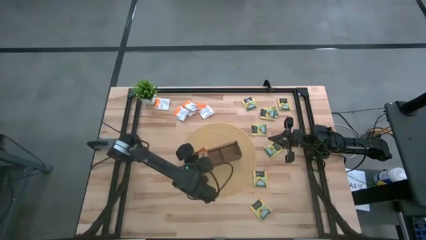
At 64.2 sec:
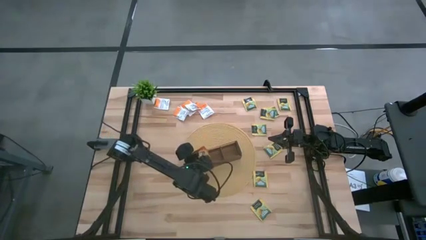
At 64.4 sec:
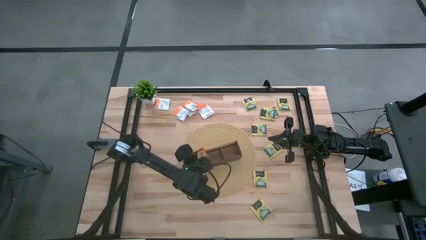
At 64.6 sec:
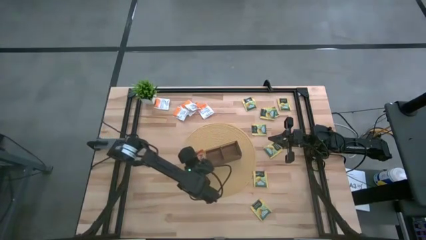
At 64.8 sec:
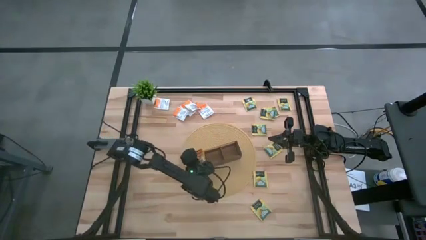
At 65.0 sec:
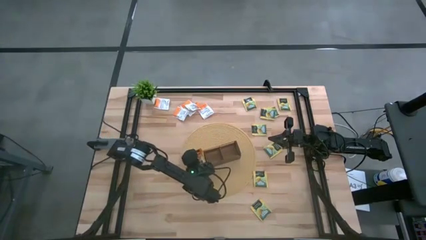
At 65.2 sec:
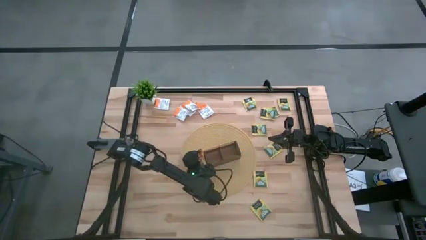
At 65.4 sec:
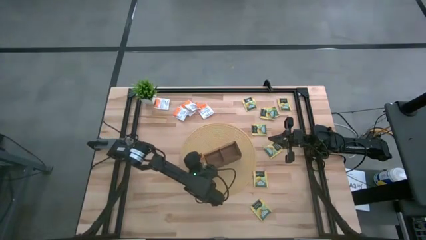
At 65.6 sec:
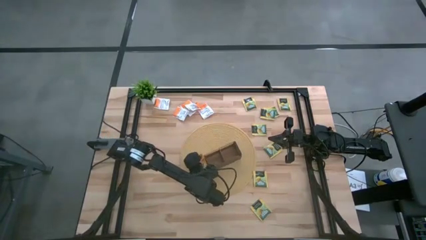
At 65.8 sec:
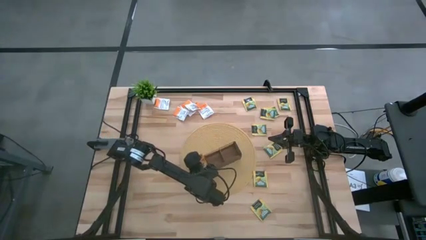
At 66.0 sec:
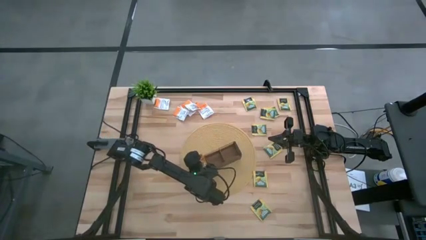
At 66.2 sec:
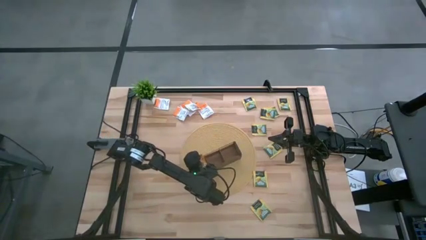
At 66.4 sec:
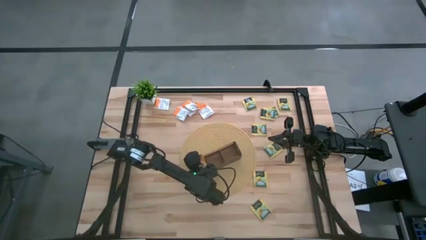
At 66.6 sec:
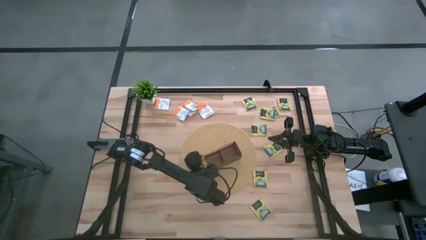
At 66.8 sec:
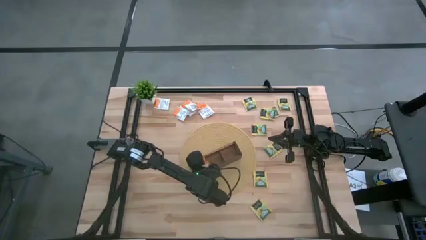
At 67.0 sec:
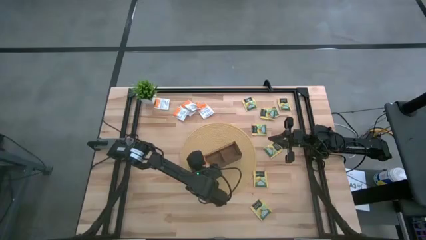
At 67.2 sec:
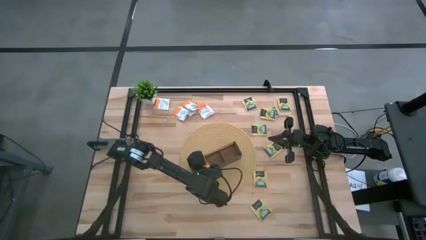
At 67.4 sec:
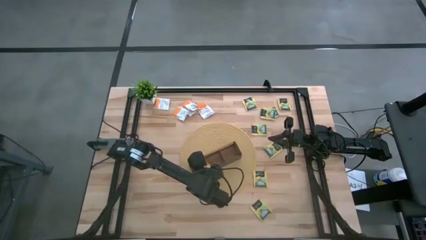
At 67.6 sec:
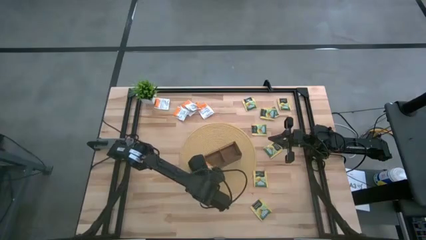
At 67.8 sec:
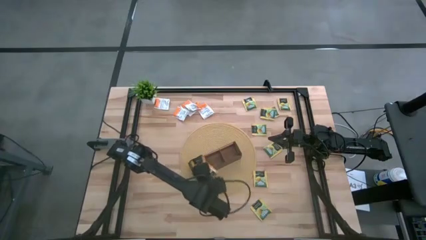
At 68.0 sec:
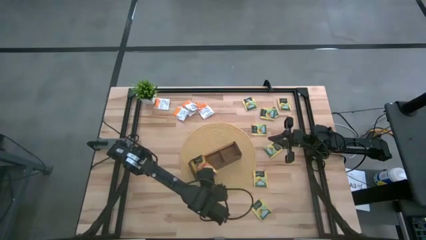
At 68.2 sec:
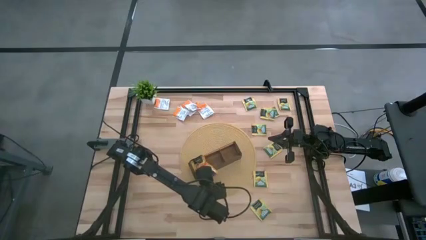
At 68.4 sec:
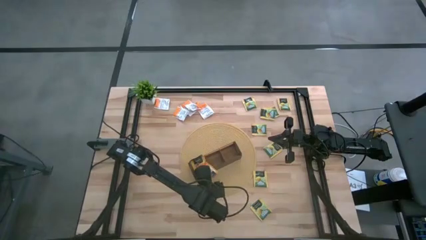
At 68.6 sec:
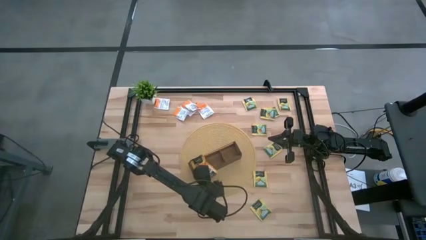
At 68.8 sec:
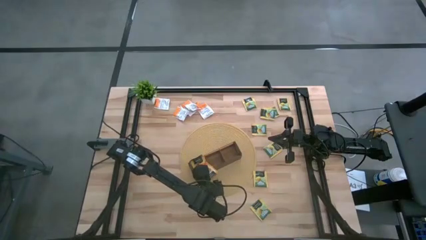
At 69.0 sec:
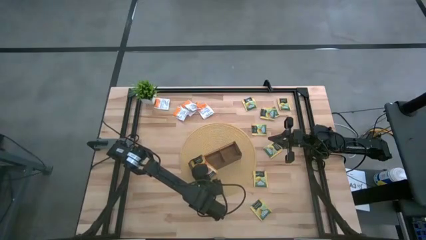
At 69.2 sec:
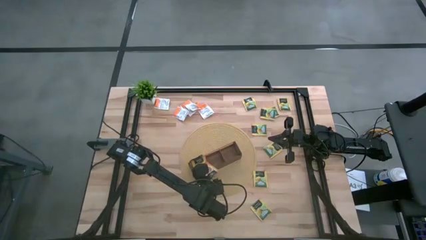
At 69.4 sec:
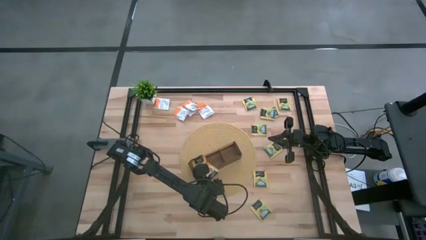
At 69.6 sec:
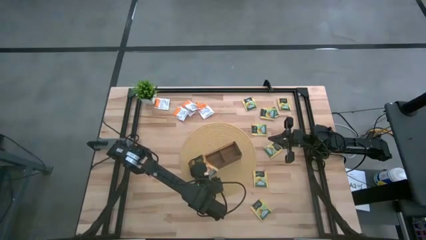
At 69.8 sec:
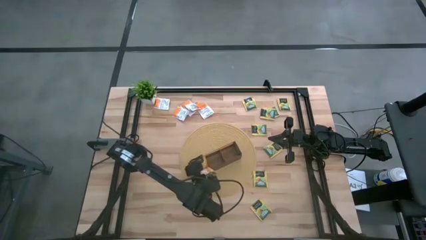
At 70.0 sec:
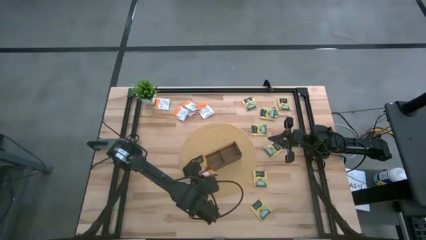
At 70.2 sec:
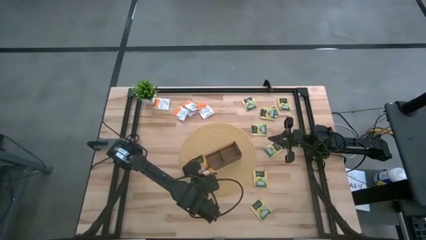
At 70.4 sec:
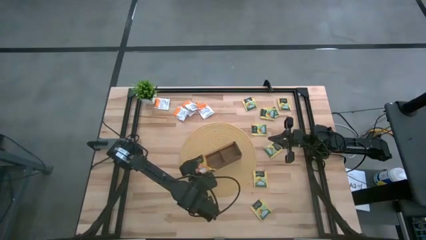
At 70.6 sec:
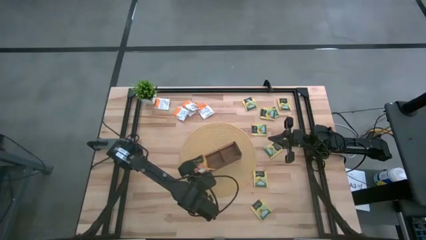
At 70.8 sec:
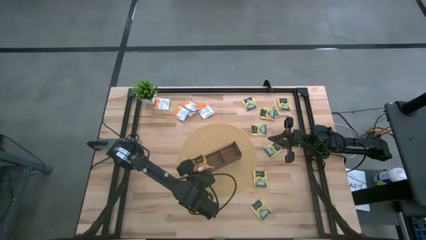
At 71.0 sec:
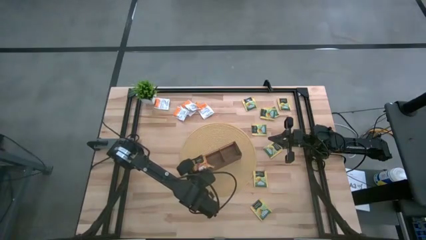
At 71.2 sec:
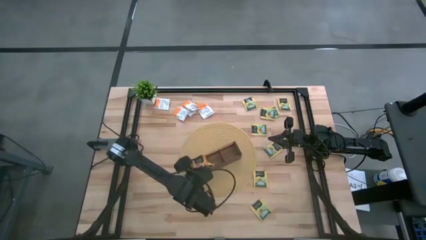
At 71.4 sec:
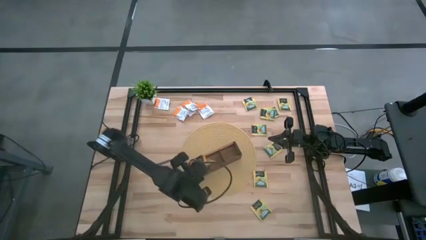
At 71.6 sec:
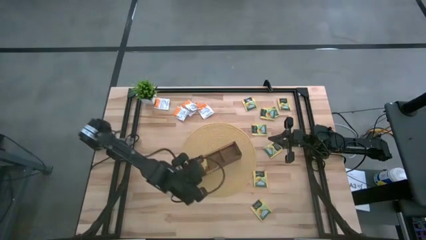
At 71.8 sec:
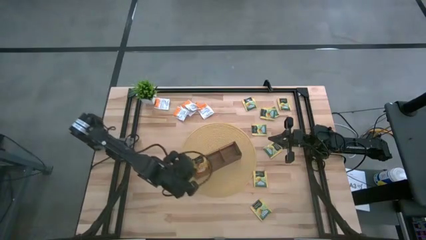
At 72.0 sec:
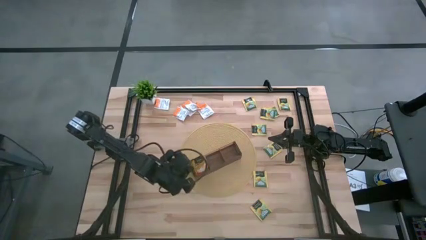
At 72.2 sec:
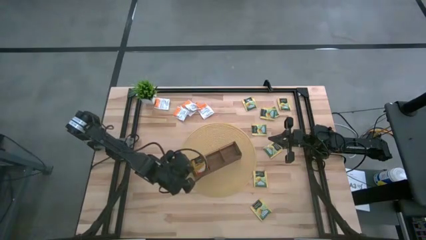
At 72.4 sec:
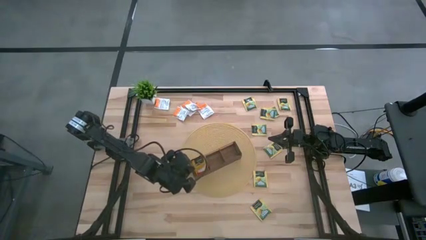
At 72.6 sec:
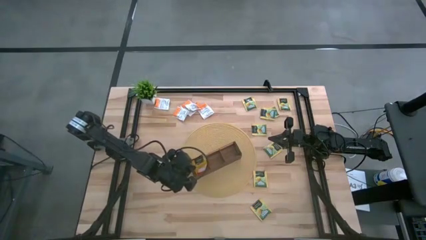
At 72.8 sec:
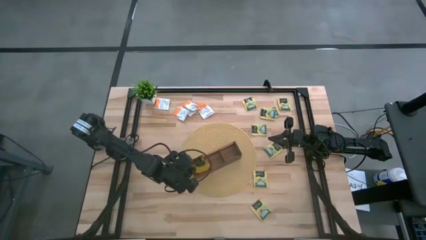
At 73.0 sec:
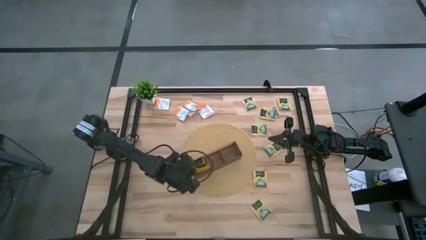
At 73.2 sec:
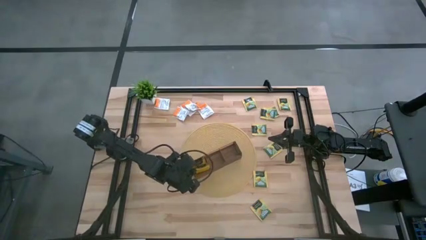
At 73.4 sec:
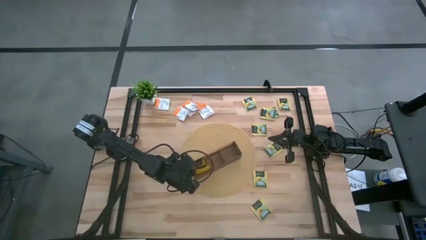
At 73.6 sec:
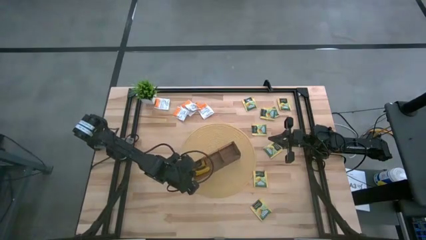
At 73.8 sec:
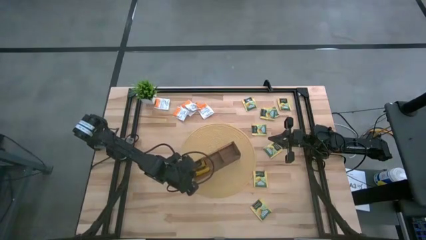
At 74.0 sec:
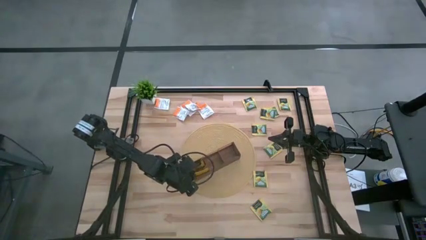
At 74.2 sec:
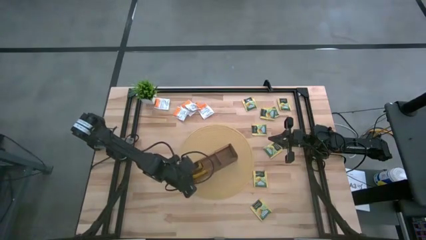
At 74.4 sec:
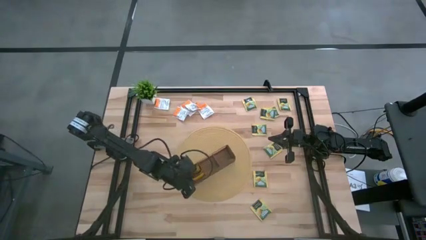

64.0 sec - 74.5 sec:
Task: Pick & Place Tea
Put the mango tea sachet into the left section of the wooden organizer

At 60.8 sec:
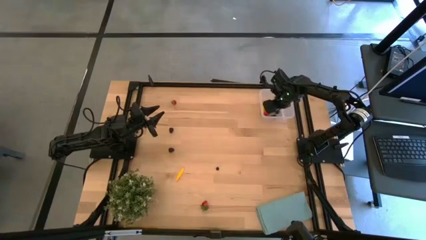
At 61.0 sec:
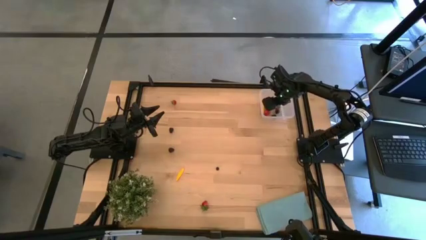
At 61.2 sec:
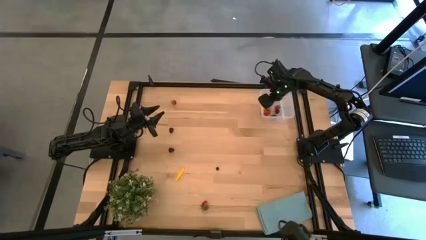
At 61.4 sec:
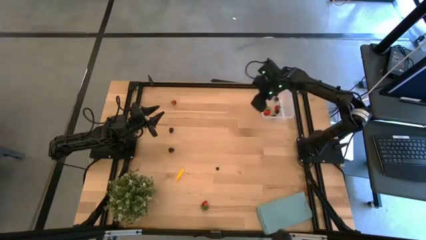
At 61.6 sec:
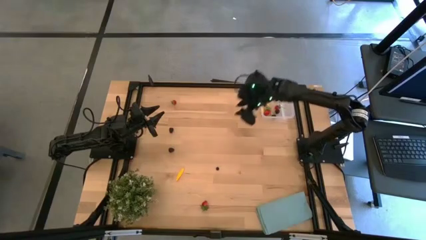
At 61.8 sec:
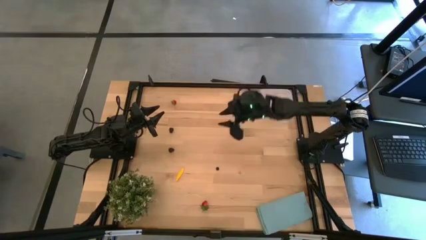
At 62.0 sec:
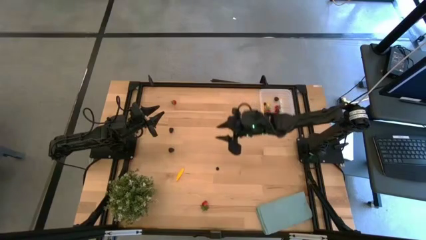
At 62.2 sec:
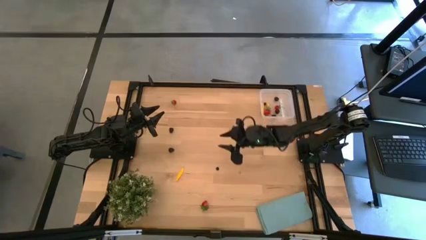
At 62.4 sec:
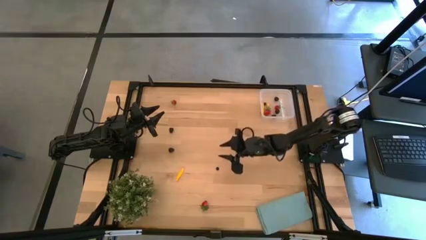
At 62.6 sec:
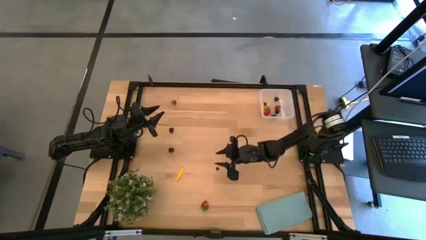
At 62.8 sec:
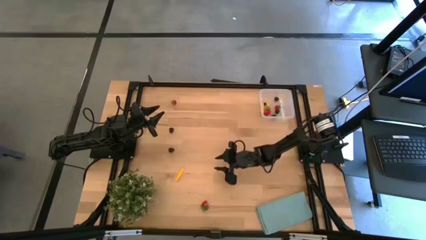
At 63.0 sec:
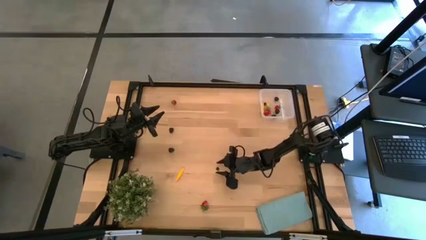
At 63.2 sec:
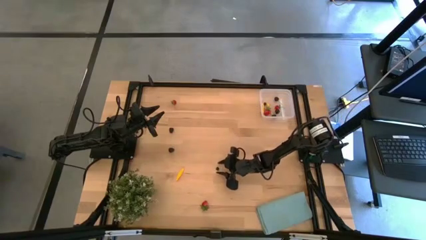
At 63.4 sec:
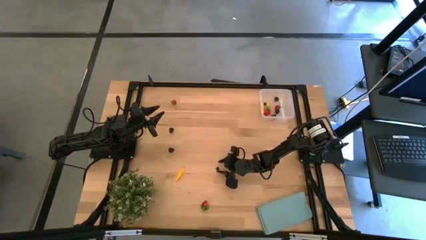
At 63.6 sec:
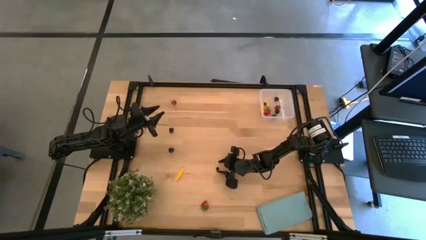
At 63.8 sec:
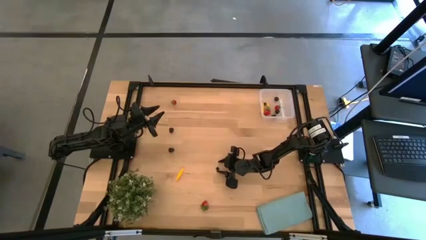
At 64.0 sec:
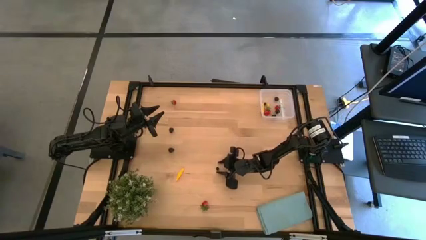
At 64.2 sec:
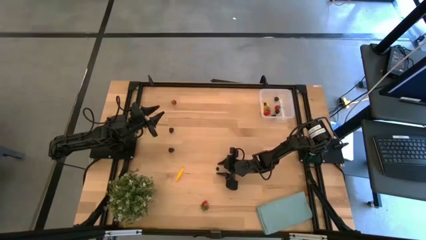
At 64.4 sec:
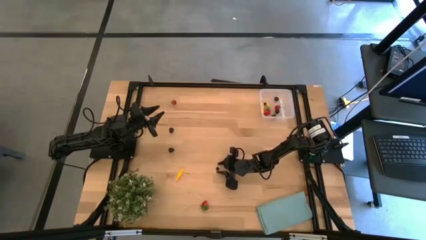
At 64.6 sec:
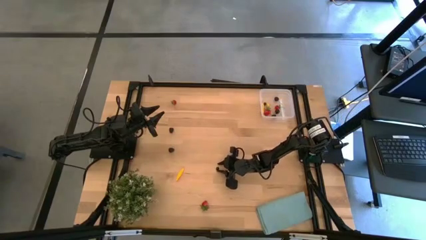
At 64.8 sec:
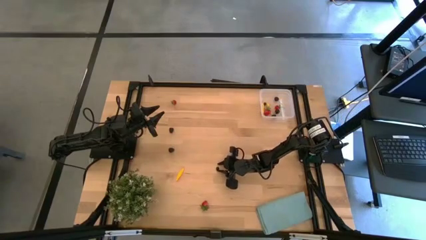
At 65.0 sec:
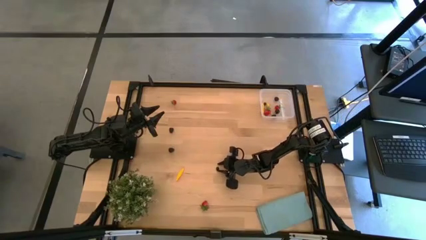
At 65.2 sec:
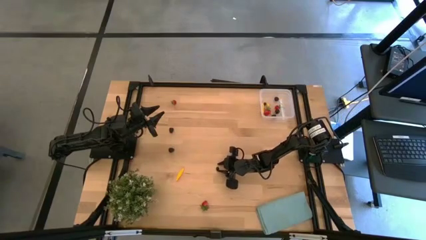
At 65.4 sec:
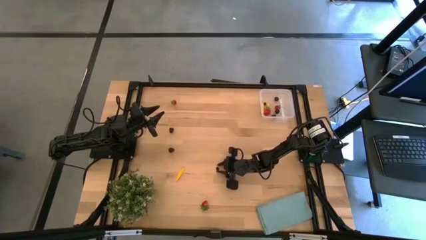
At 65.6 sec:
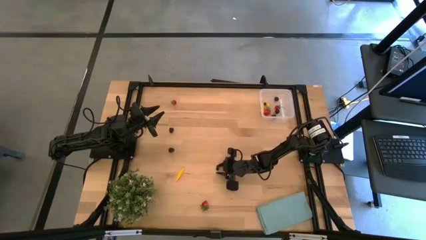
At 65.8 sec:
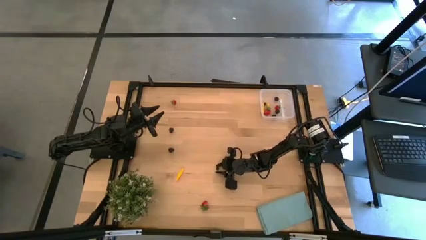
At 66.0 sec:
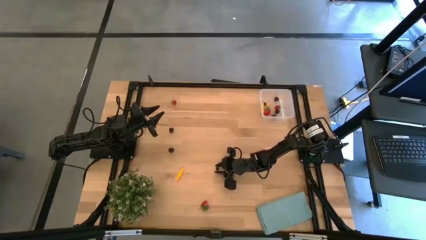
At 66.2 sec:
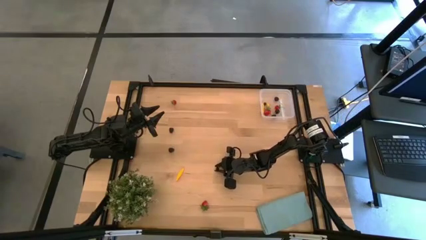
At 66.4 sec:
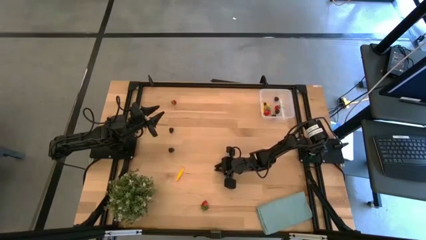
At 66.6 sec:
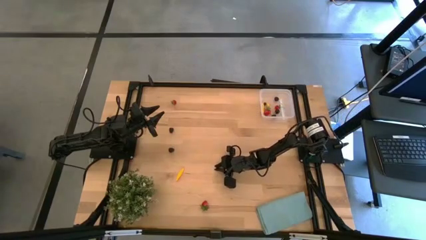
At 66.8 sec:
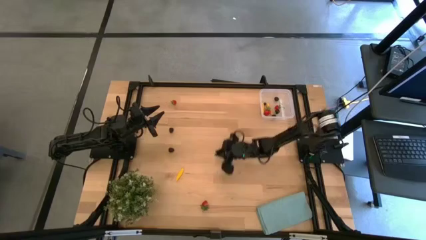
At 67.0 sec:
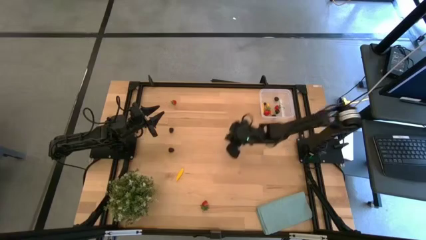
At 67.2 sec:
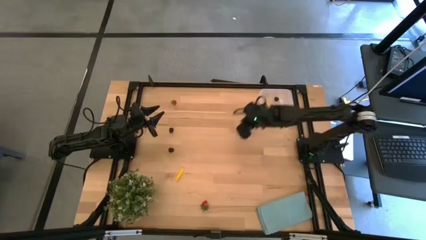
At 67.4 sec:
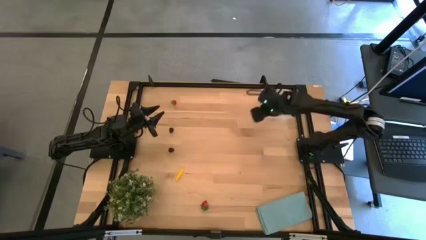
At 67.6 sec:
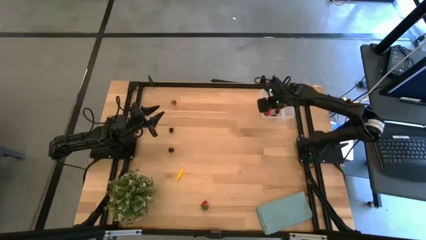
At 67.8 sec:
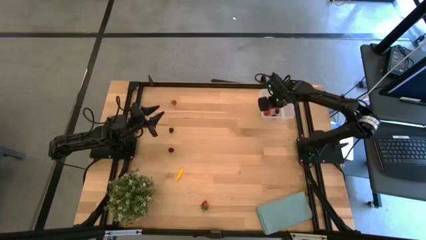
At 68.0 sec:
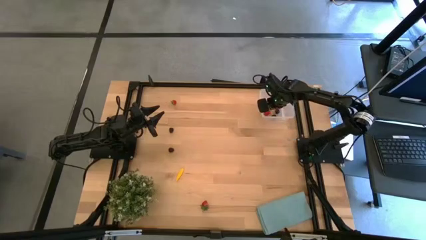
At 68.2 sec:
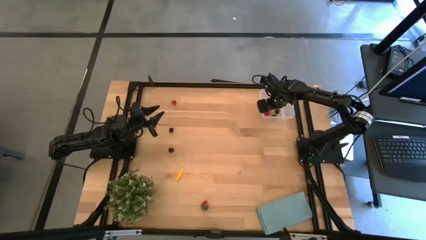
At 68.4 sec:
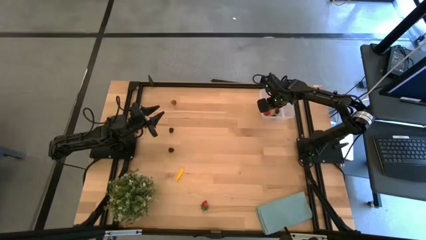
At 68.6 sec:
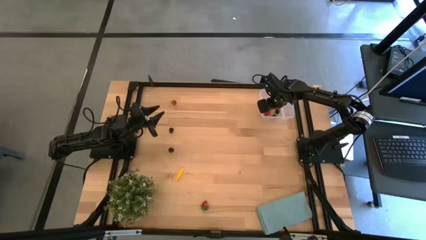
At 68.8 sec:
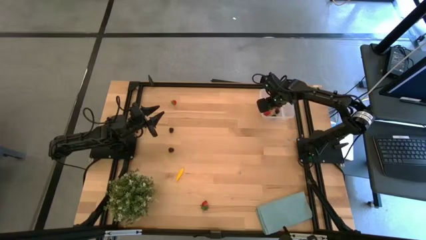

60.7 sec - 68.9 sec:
Task: Pick and placing Produce into tupperware
Put the blueberry into the transparent bin
